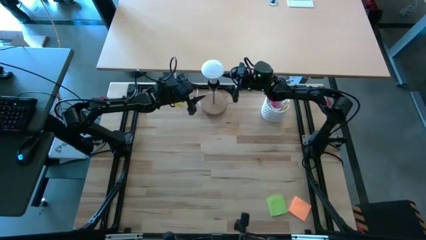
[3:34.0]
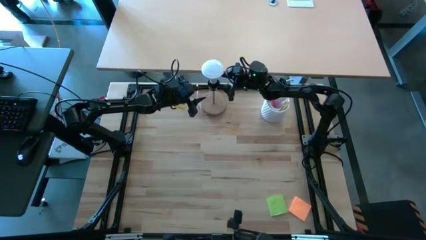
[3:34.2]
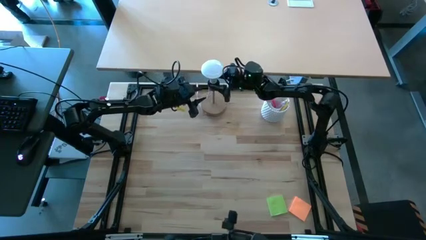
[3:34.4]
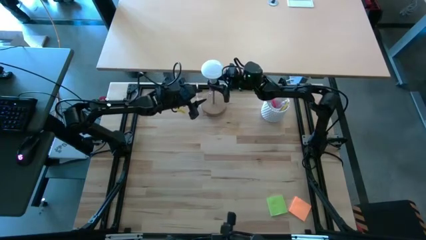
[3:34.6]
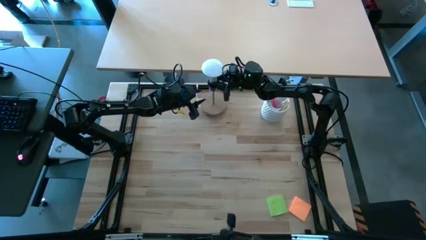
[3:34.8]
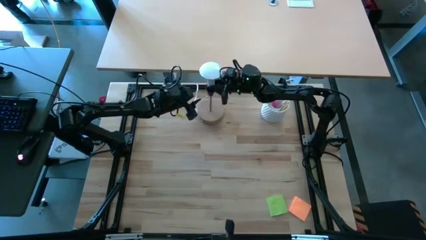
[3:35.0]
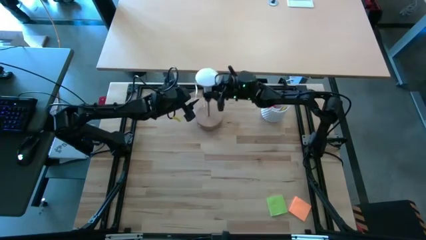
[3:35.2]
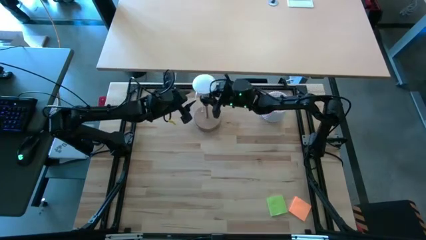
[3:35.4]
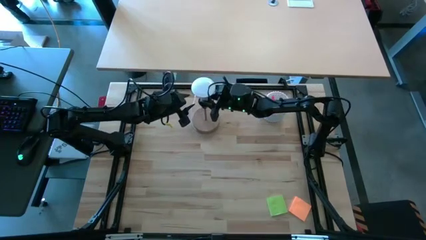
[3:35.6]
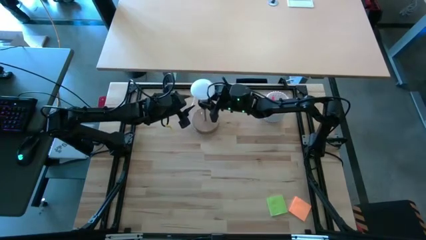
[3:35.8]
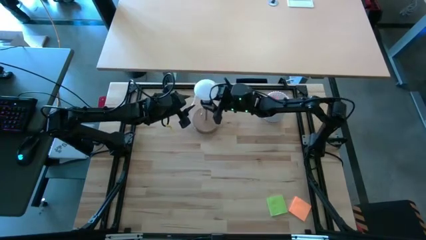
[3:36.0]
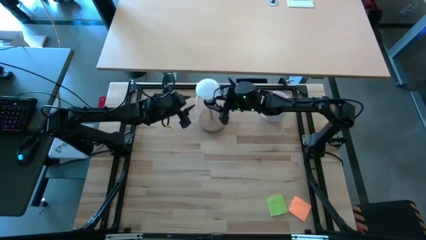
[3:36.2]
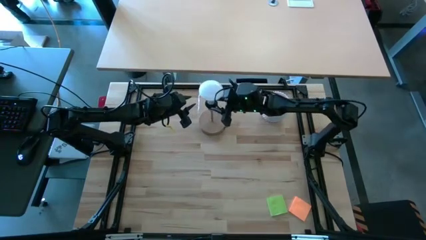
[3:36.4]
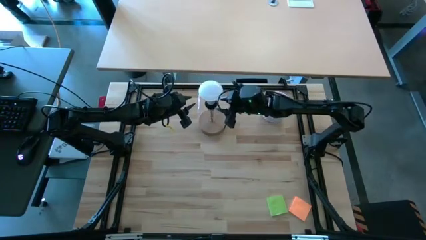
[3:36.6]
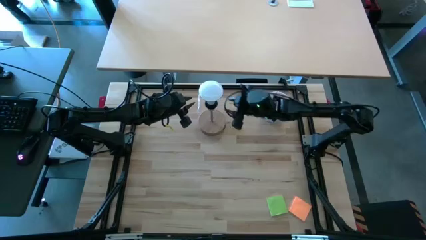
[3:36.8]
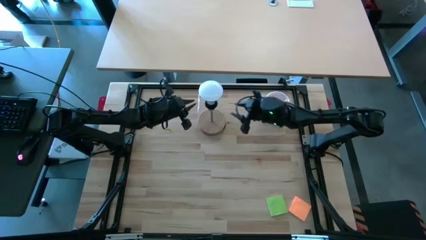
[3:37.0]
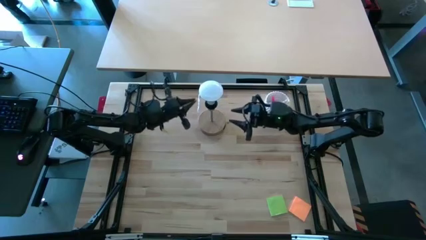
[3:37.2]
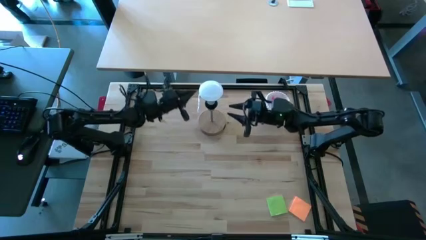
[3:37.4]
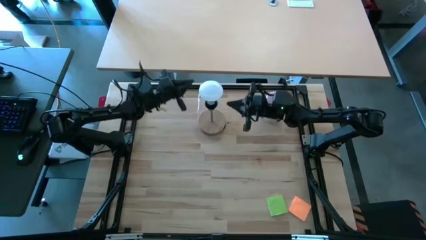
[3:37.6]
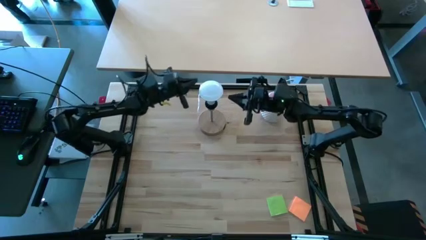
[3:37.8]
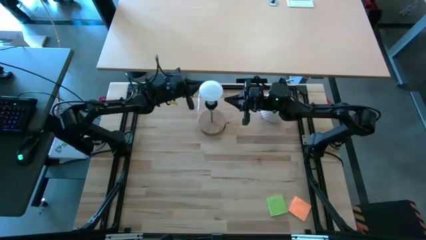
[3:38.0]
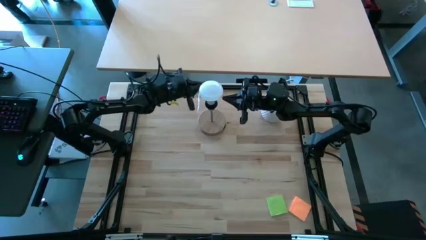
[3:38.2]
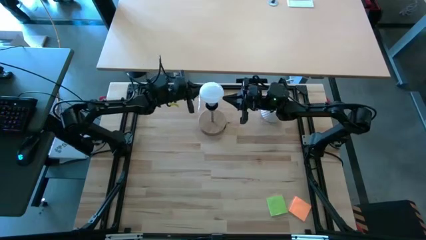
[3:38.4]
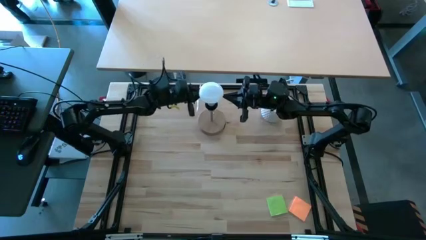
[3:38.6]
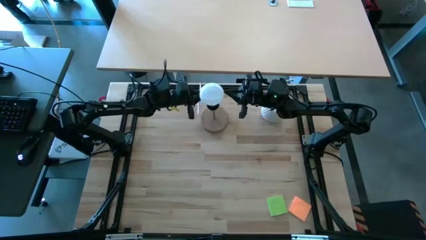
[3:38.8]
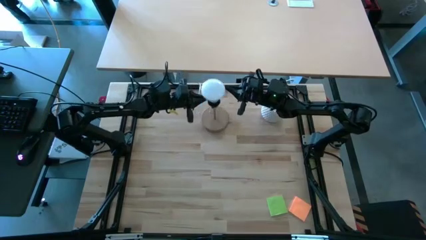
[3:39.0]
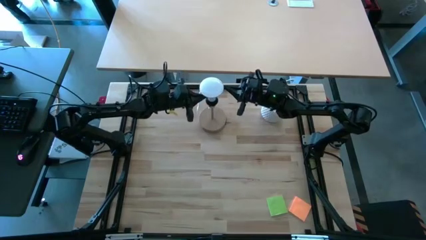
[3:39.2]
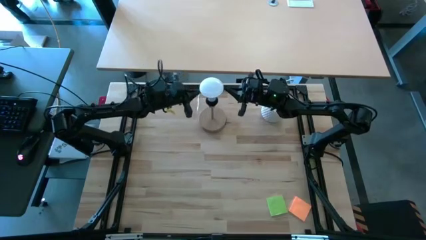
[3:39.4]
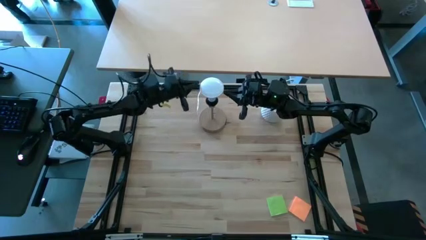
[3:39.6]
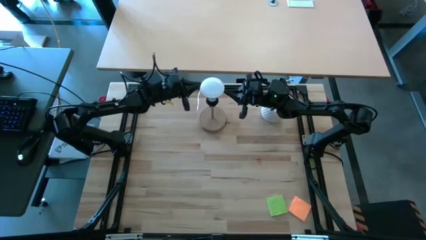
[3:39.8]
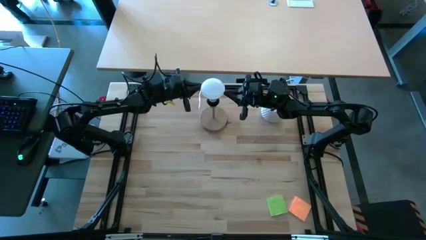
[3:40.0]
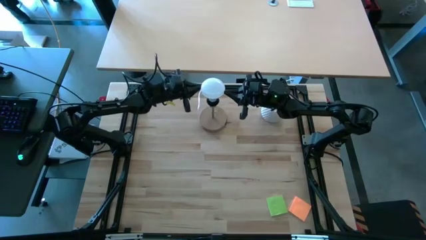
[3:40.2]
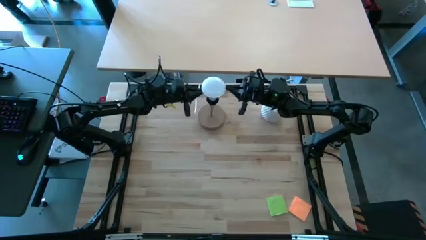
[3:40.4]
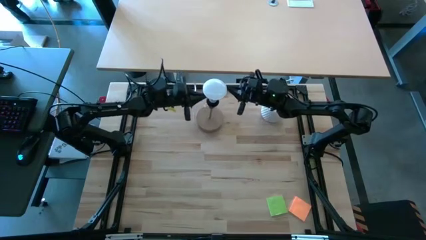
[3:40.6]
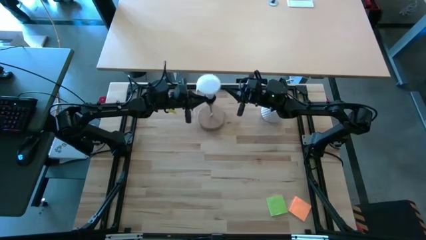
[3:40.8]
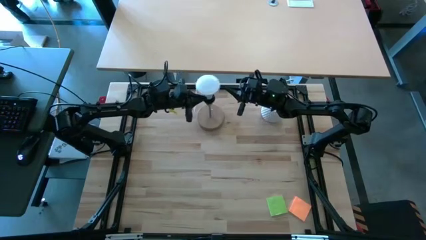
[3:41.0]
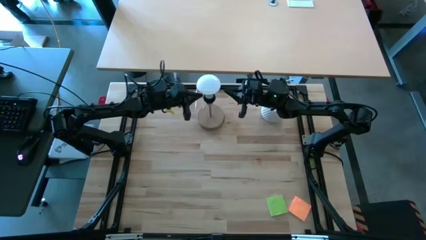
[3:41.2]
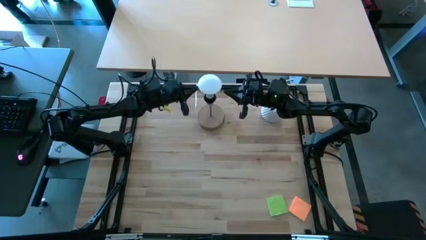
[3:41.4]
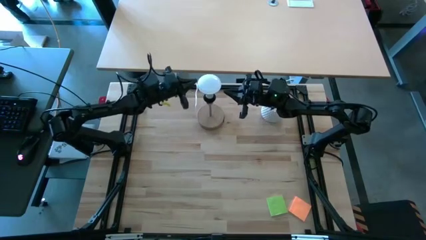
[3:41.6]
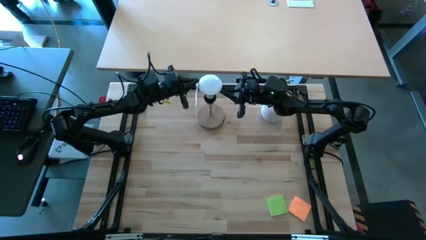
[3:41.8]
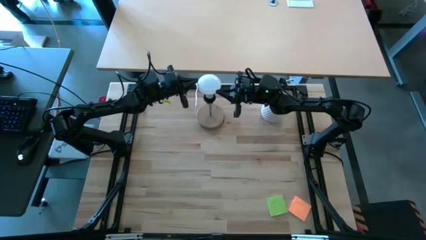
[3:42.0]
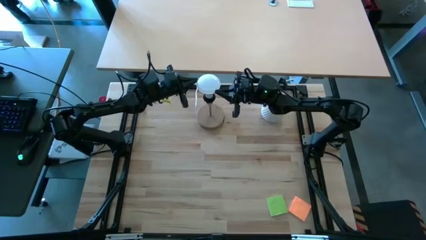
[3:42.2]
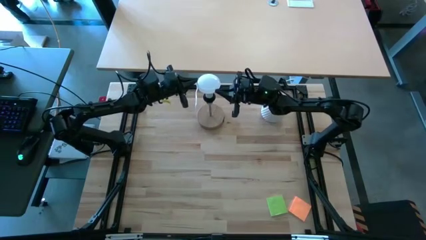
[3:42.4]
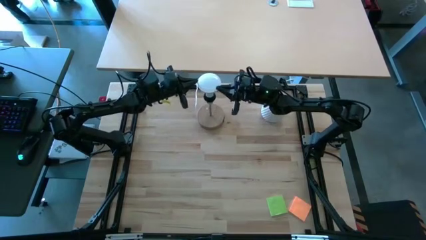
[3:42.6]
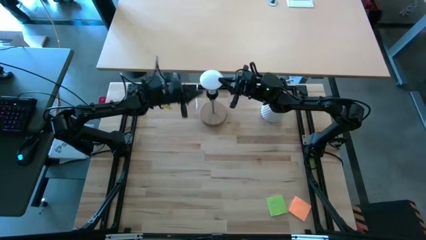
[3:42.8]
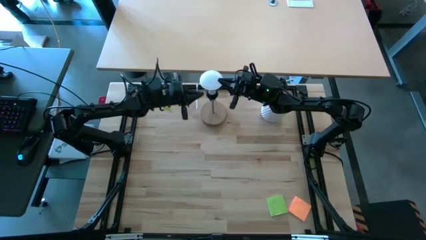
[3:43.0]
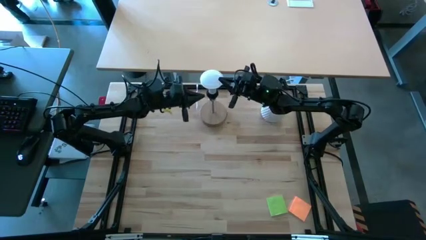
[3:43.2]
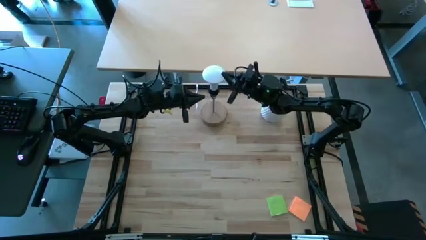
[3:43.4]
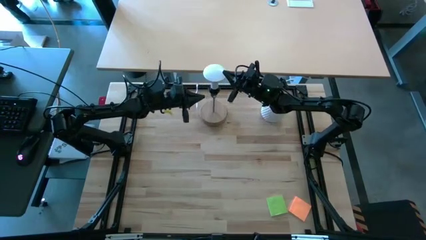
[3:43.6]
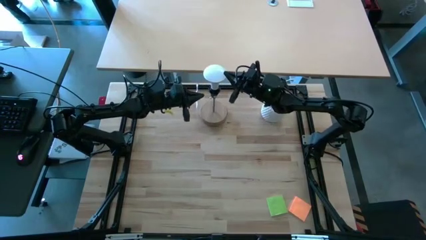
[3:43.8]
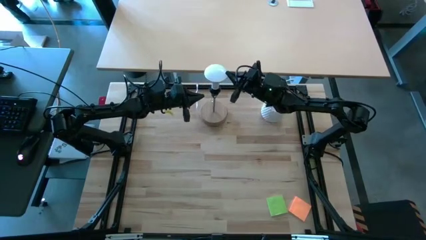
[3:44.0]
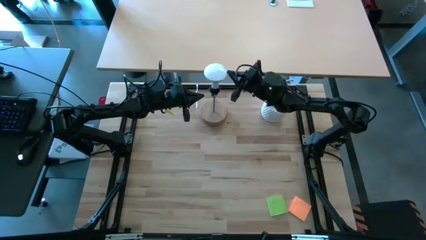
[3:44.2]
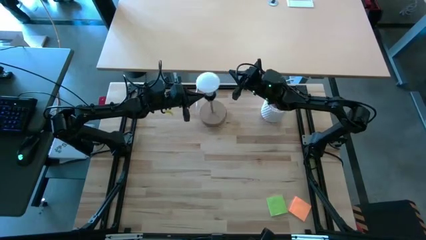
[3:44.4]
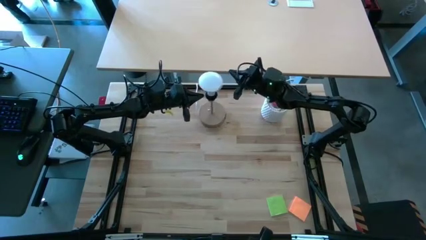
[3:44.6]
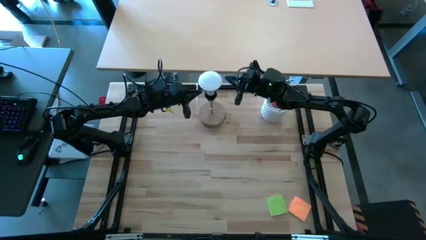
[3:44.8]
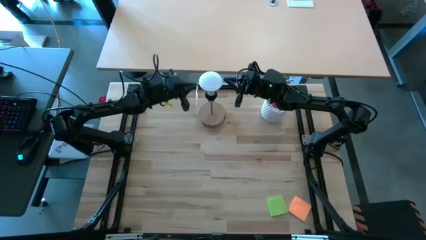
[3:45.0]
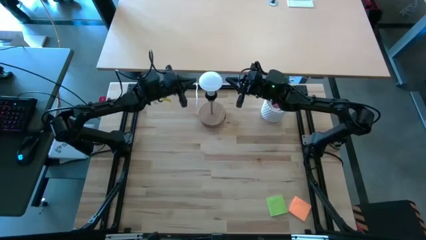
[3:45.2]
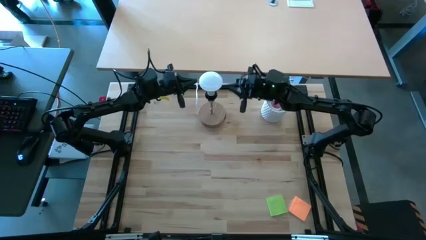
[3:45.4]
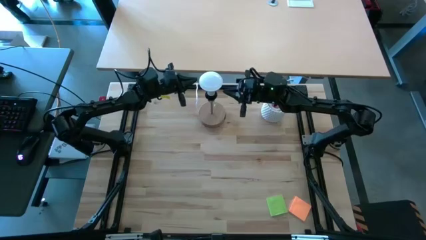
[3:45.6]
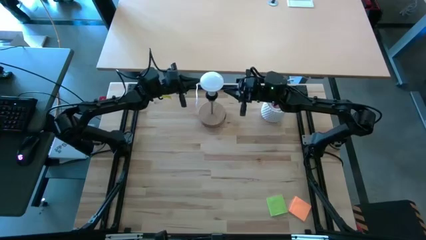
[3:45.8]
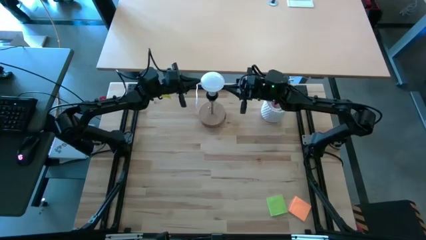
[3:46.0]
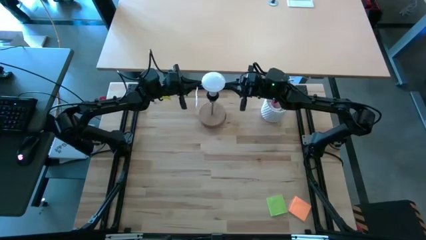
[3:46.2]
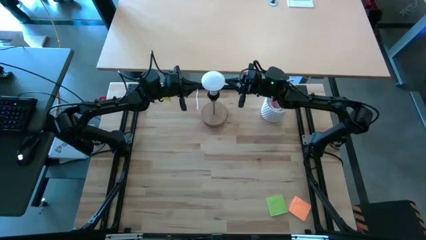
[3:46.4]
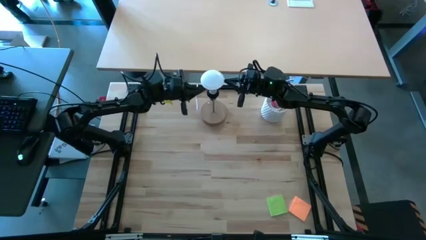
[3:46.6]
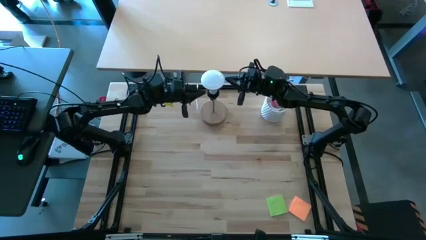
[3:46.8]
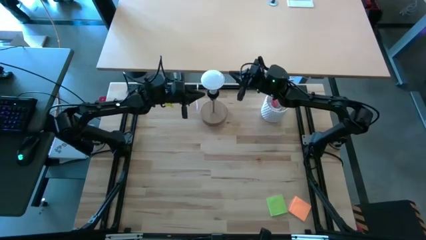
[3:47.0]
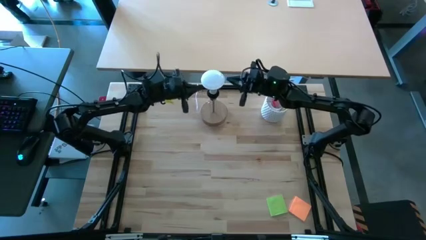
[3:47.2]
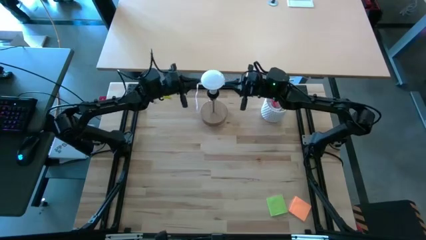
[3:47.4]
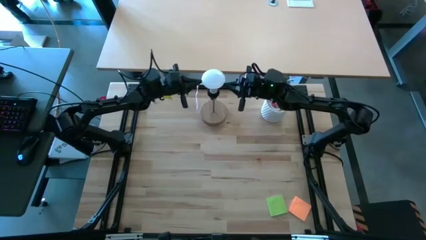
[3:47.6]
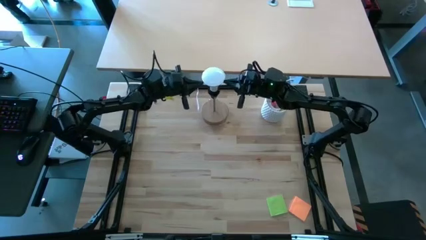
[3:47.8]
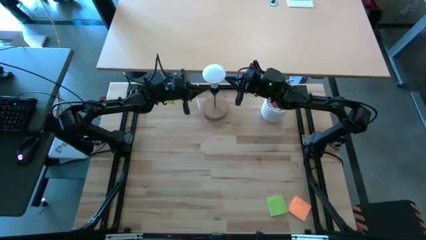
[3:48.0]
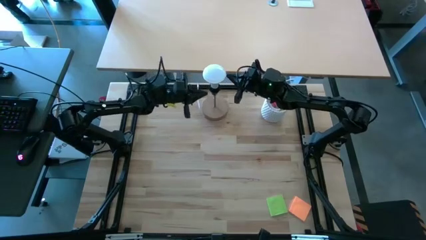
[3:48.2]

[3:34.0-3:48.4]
Task: Screw lightbulb
Remove the lightbulb from the lamp

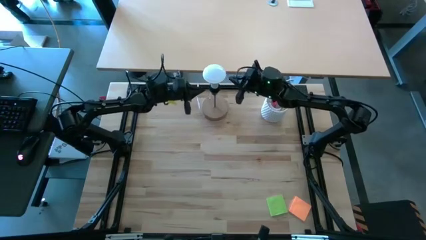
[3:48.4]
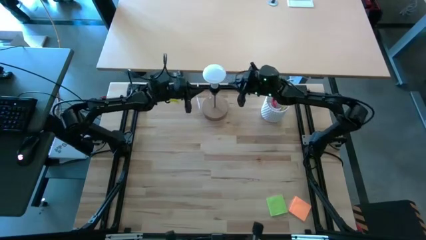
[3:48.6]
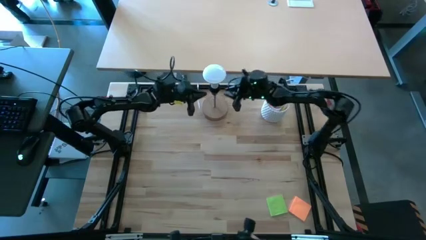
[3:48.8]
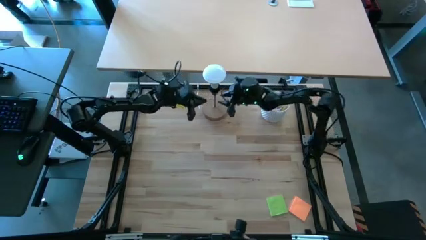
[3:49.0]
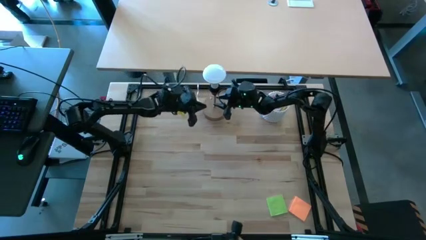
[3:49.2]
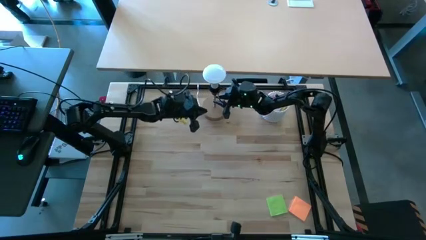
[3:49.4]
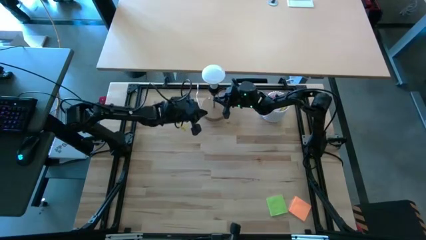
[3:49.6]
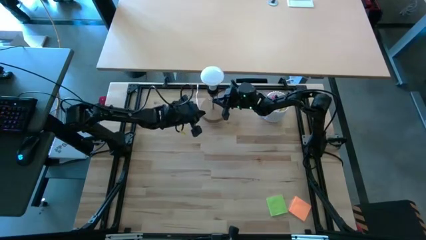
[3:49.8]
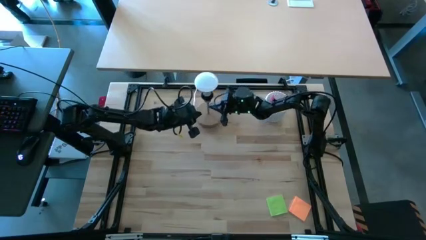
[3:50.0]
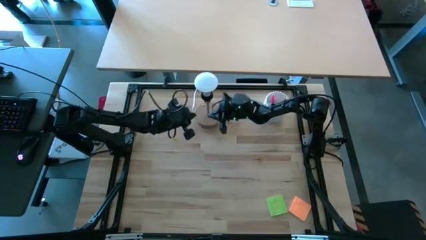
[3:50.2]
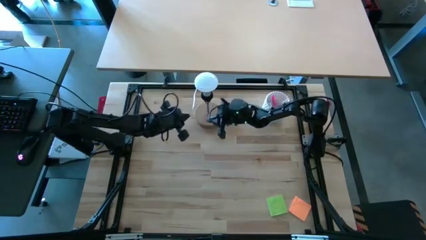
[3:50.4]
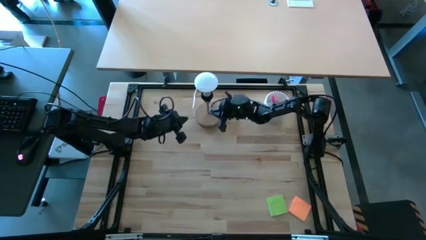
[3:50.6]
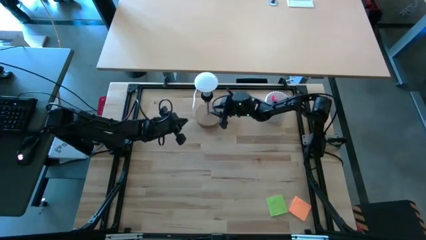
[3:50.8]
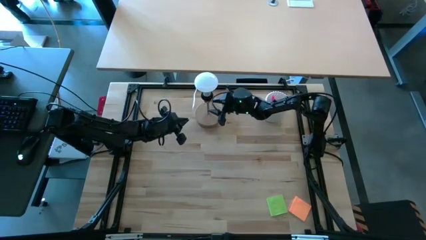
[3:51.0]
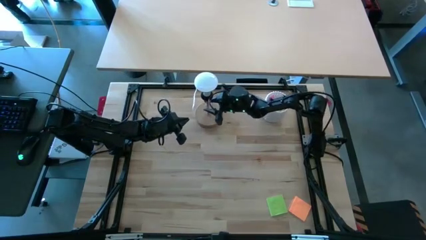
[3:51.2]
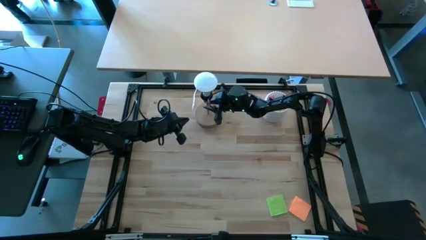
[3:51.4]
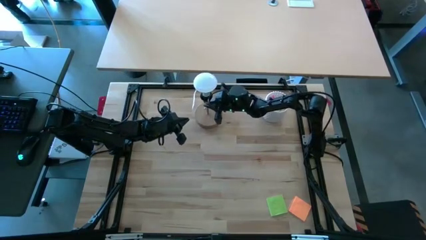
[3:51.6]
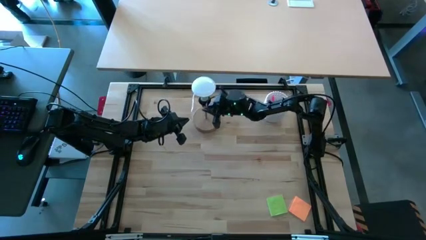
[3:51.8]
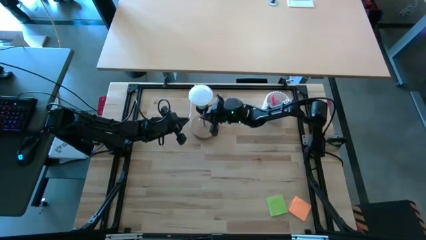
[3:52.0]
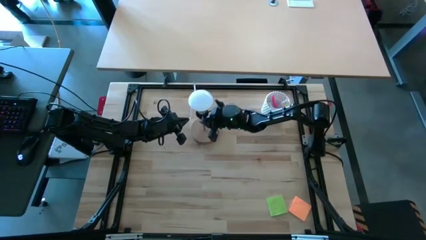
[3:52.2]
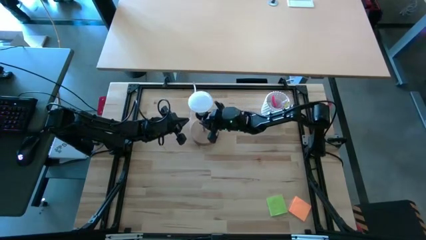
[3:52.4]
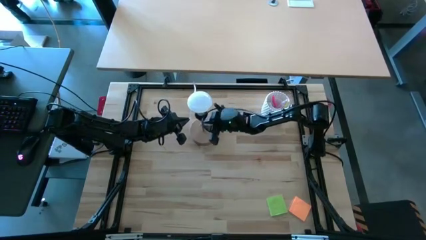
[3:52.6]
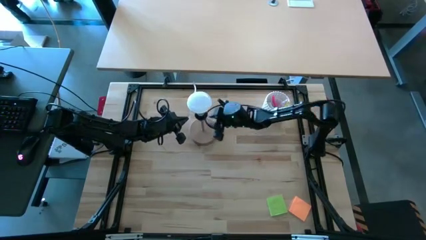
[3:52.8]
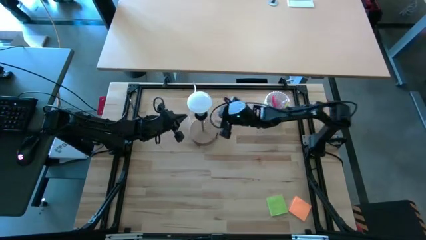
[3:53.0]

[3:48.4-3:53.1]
Move the lamp to the center of the table
